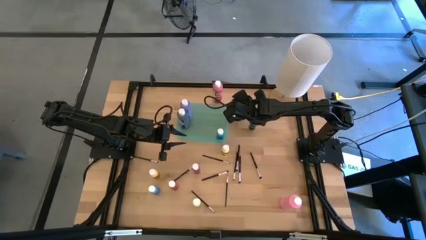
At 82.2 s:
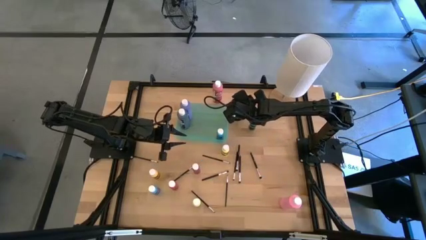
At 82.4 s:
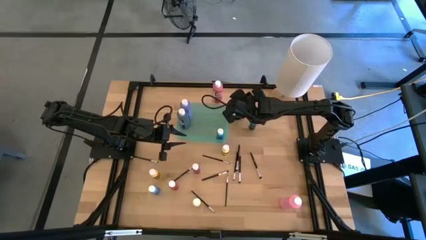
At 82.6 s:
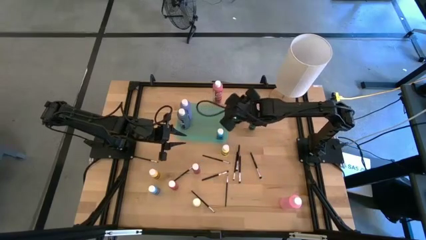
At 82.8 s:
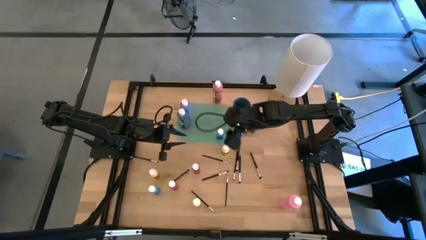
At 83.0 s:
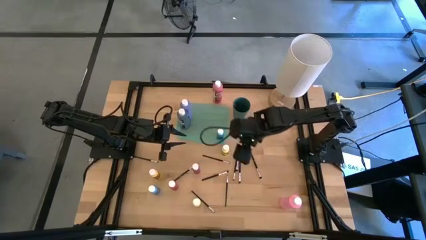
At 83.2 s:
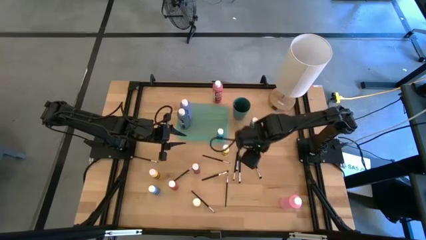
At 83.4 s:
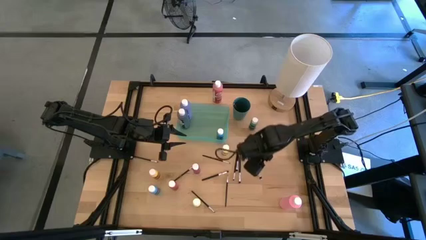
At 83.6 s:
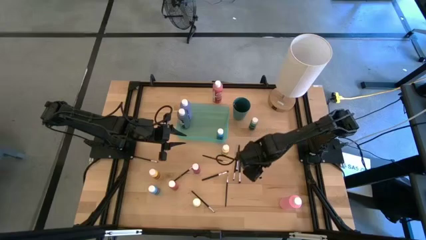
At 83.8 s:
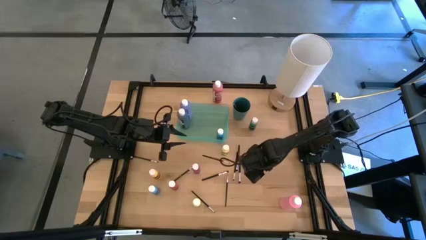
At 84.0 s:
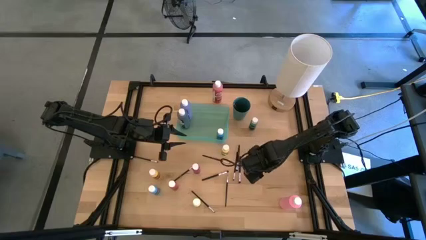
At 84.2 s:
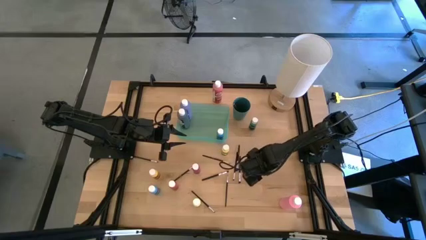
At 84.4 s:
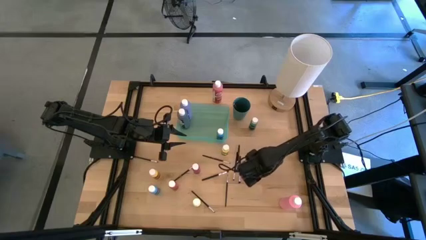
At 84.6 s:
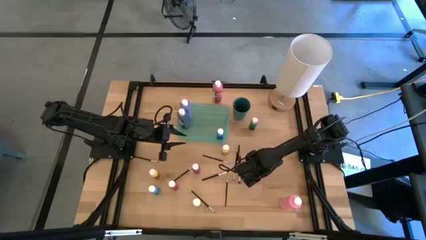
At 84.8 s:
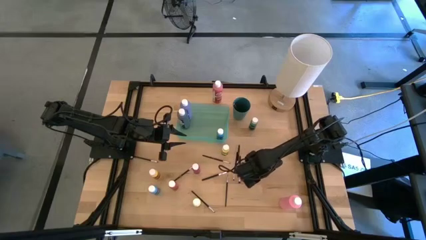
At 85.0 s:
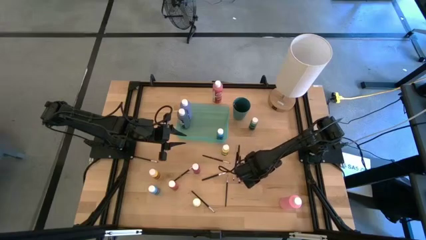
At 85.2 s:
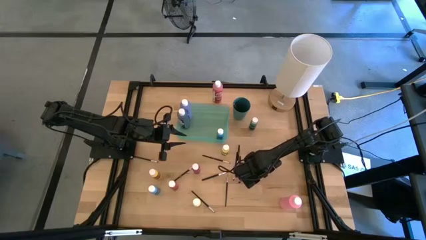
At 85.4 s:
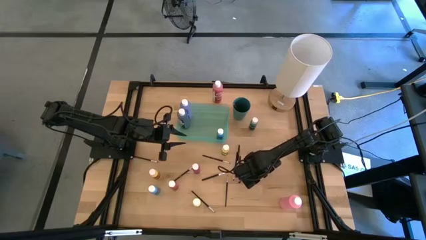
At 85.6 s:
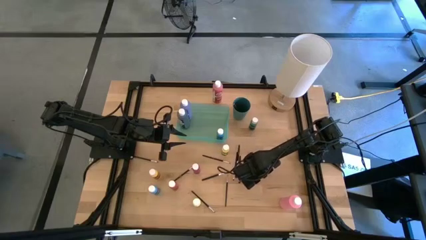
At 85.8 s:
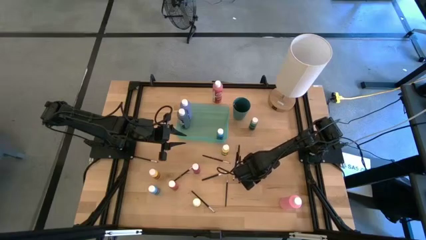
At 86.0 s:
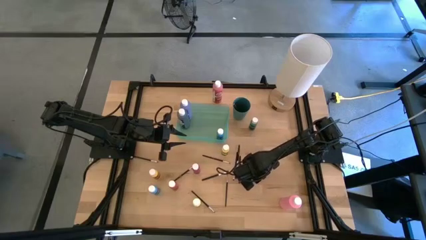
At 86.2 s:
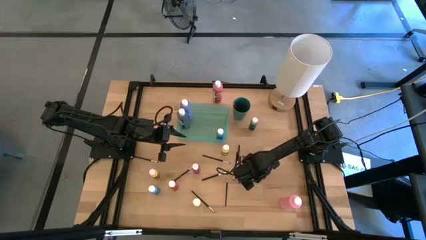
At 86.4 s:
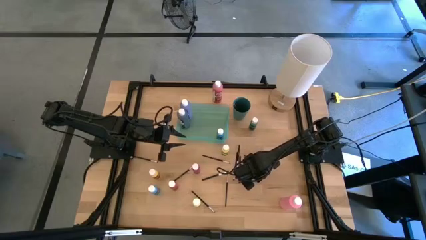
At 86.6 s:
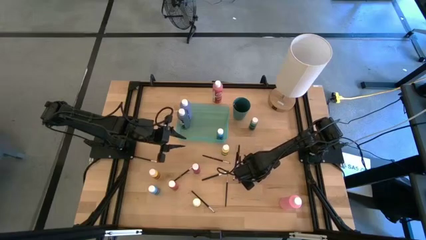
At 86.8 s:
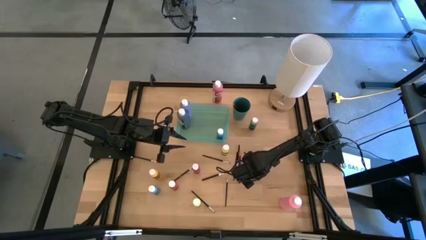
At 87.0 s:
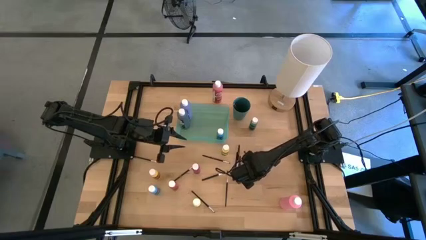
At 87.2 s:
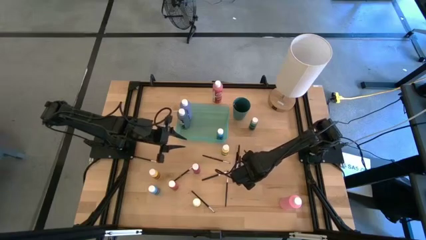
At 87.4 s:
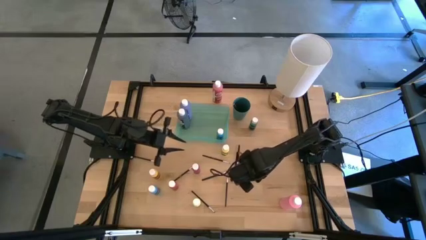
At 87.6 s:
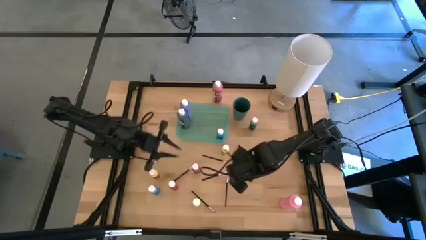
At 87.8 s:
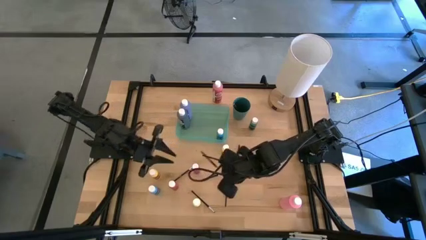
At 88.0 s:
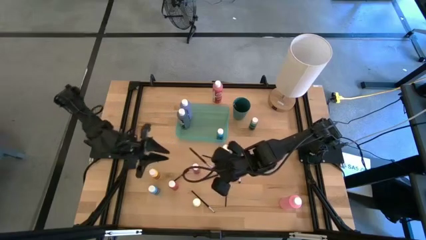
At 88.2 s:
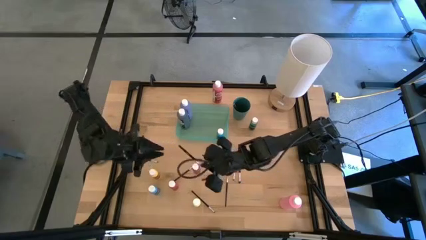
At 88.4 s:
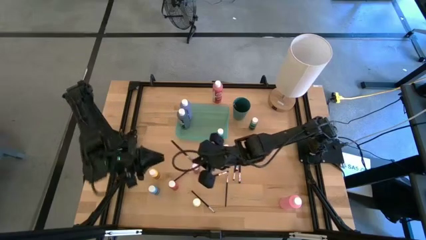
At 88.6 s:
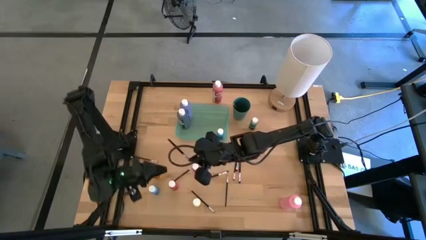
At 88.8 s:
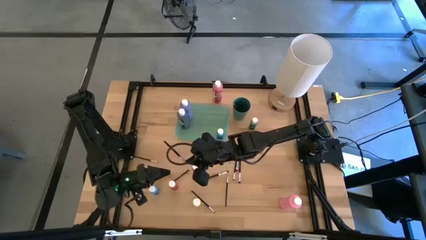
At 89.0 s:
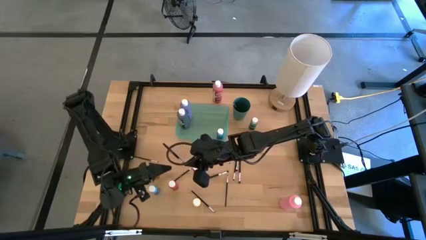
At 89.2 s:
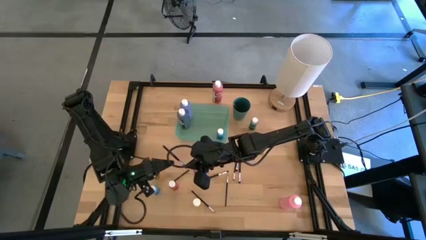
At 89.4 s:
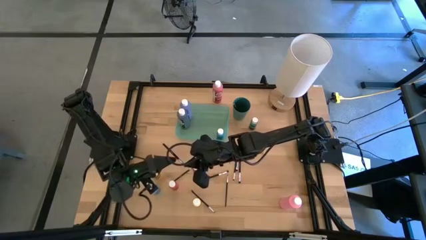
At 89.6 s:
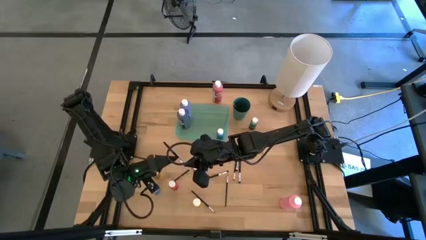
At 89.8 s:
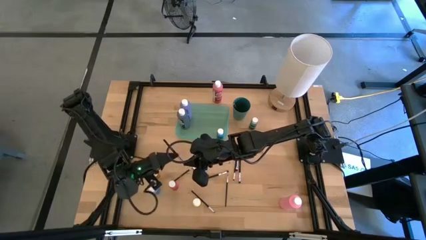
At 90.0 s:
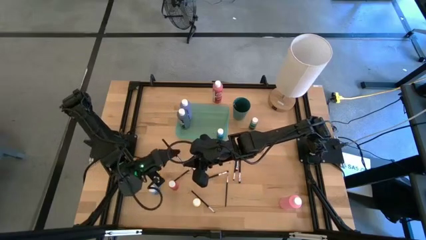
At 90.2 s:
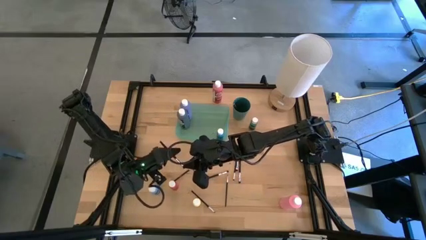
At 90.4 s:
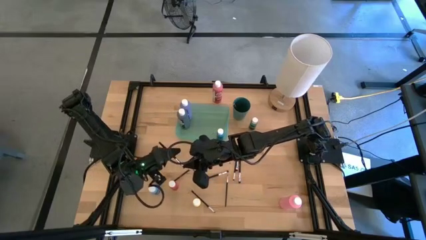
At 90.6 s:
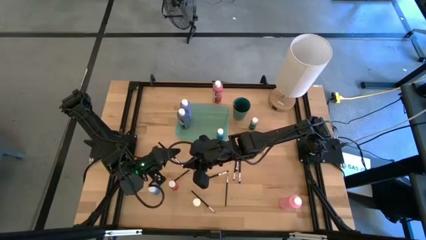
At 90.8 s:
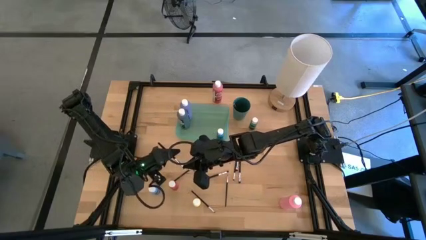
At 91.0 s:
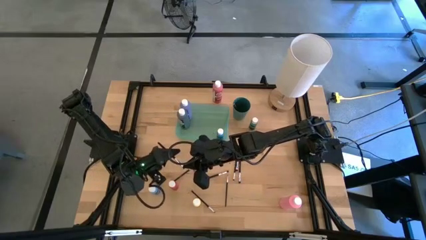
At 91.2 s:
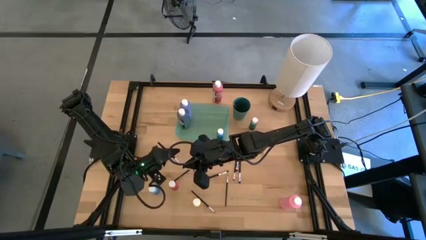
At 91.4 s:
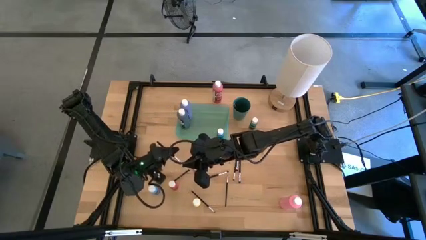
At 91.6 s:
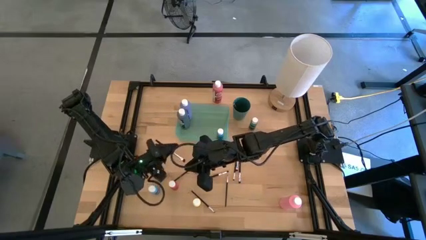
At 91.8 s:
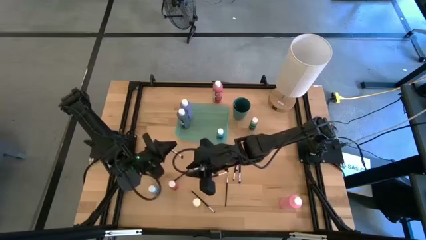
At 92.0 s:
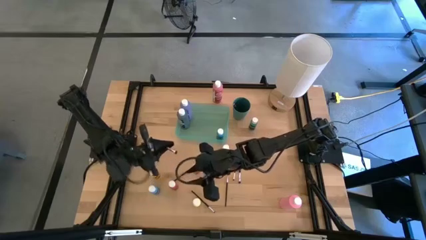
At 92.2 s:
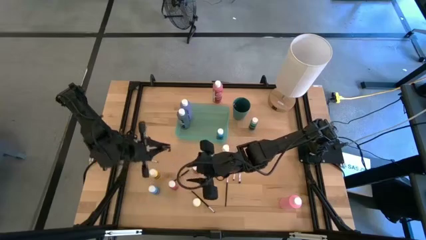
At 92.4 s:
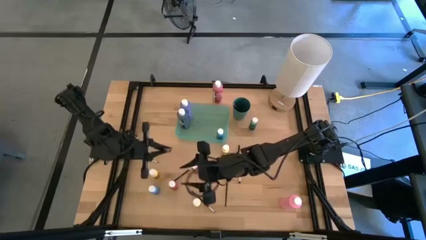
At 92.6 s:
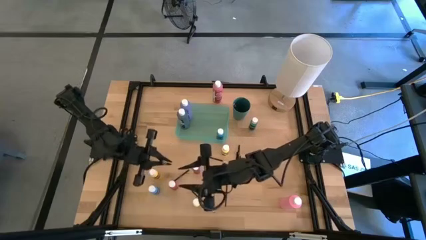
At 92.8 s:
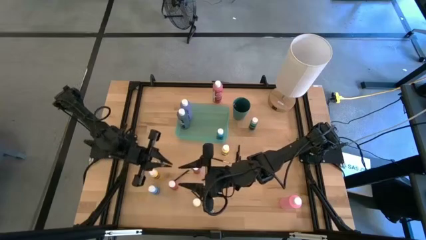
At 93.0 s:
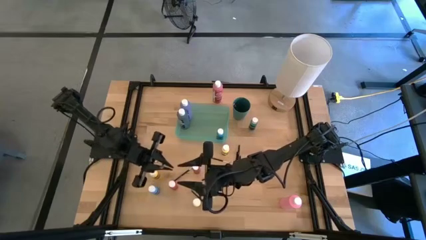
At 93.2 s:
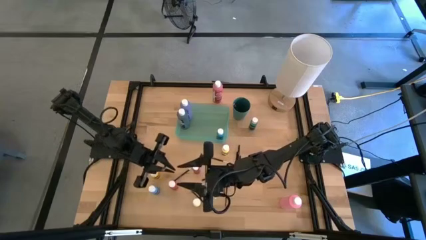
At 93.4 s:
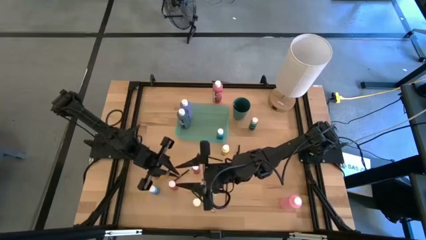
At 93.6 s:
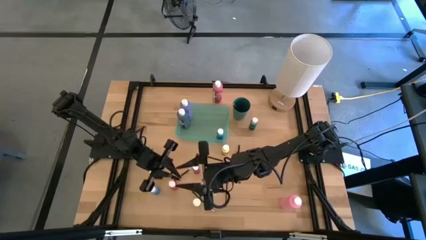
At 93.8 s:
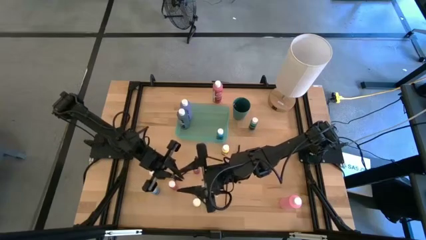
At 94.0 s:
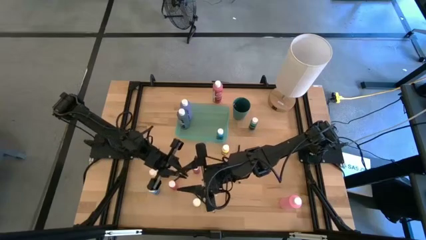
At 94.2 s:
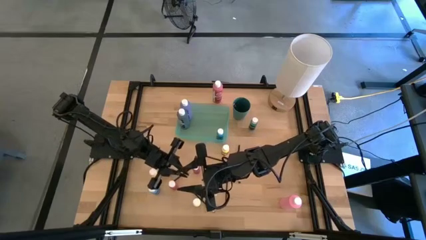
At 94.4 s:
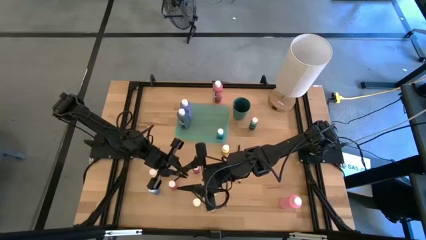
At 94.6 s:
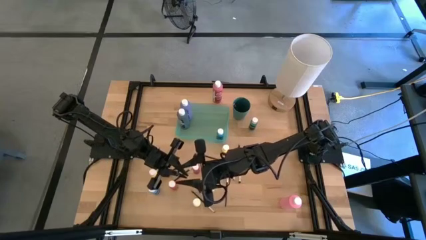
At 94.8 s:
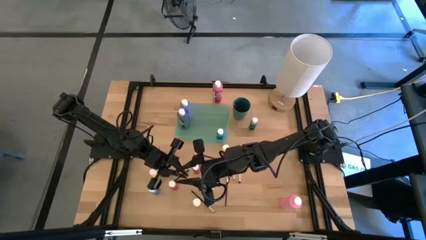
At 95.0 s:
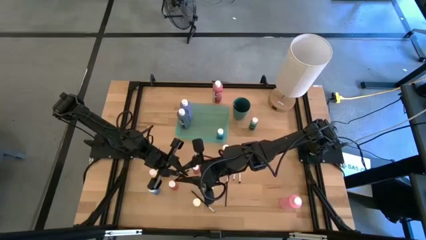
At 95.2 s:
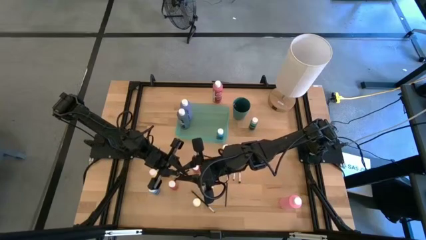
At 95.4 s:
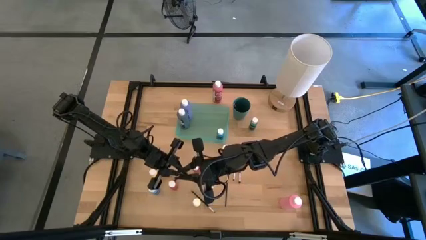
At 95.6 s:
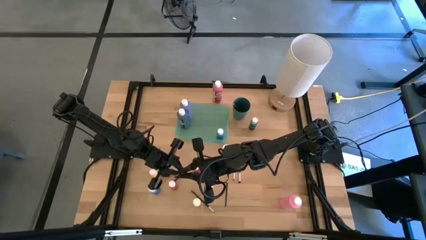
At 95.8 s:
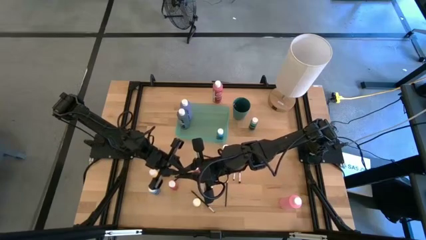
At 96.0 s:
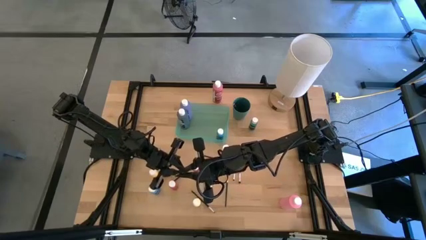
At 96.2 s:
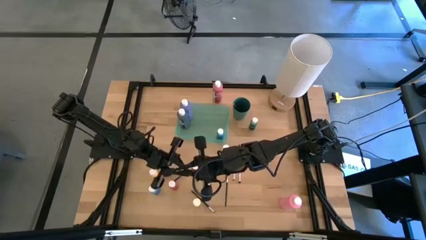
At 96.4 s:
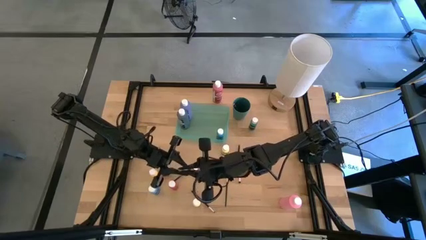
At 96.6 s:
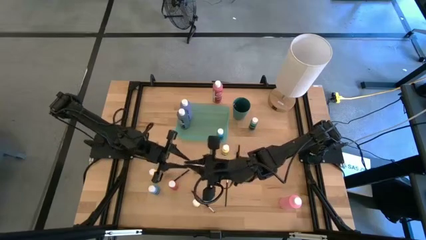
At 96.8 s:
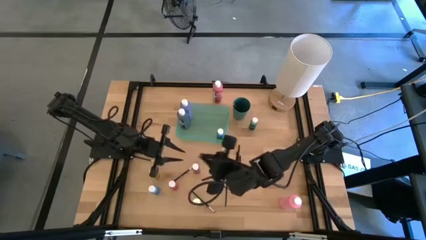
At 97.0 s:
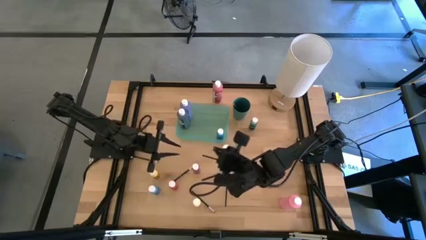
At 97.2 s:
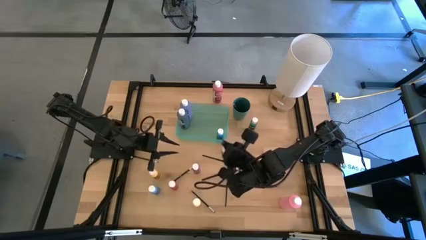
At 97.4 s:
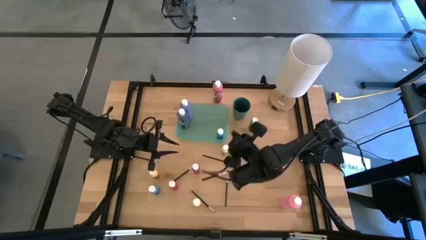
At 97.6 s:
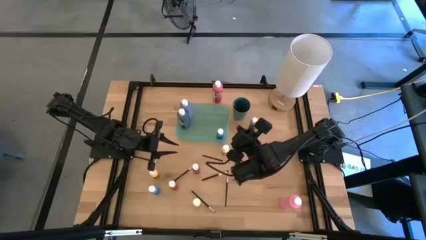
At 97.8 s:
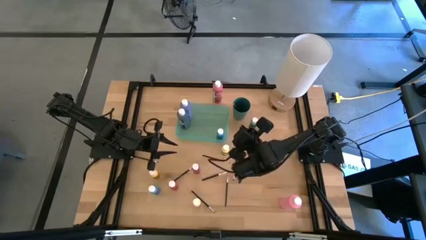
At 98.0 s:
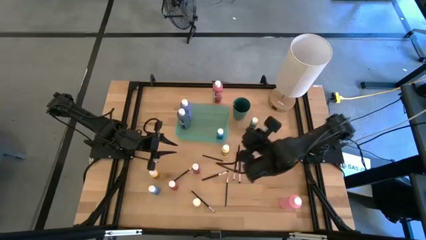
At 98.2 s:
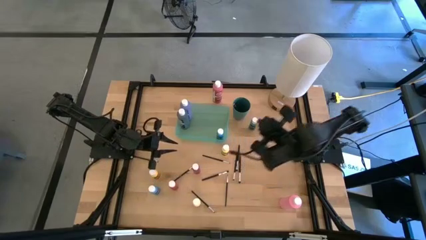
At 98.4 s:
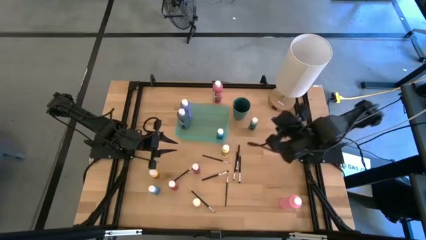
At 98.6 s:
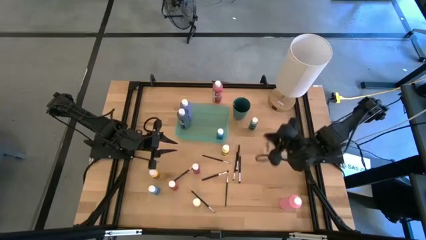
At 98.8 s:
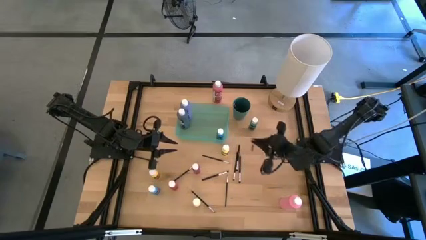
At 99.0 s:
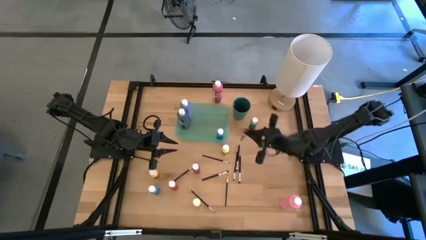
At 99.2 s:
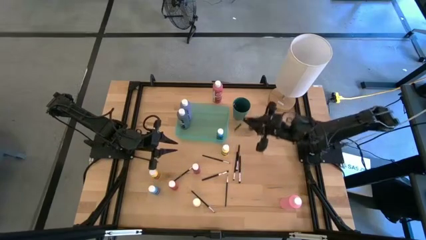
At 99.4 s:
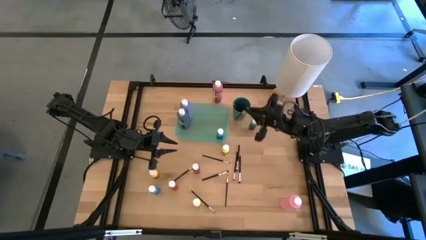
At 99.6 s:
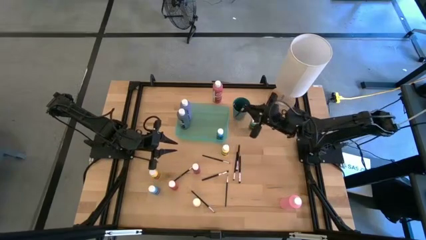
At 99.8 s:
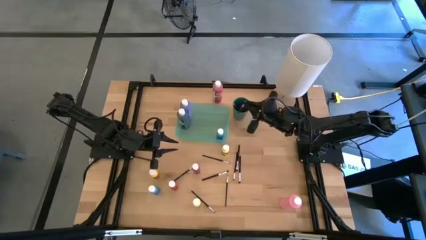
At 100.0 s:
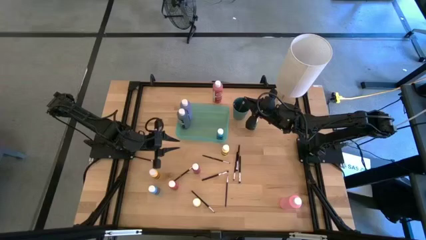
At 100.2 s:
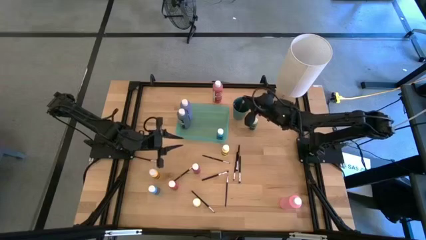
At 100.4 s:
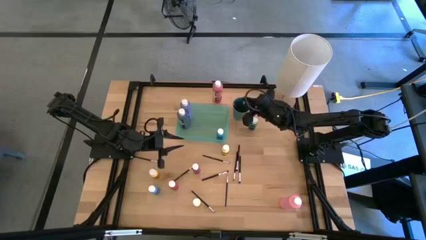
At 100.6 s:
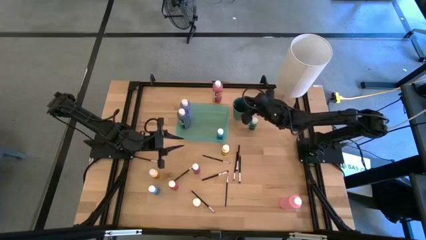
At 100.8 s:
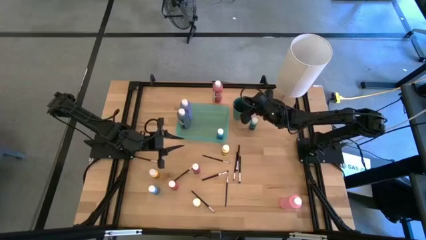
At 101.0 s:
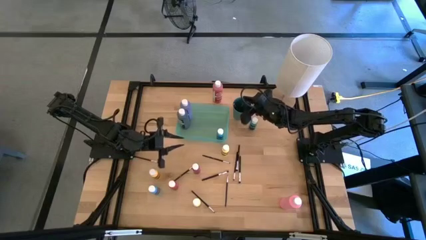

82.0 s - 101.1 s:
Task: Pick & Place Paint Supplies
Put the black paint brush into the dark green cup
